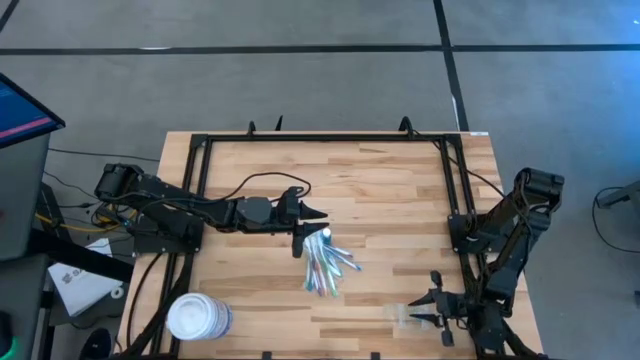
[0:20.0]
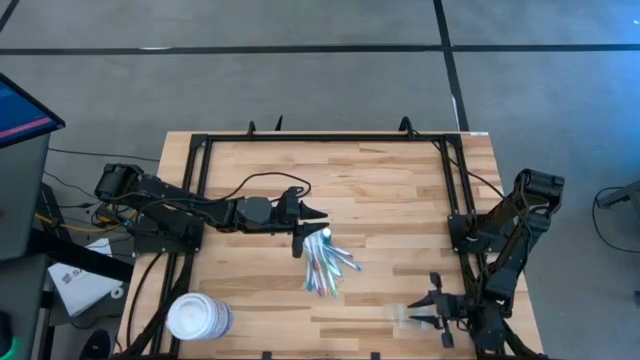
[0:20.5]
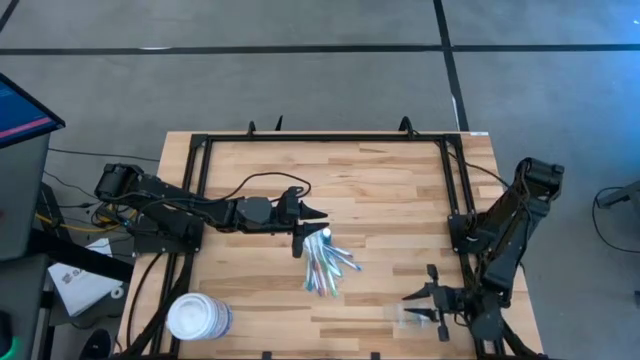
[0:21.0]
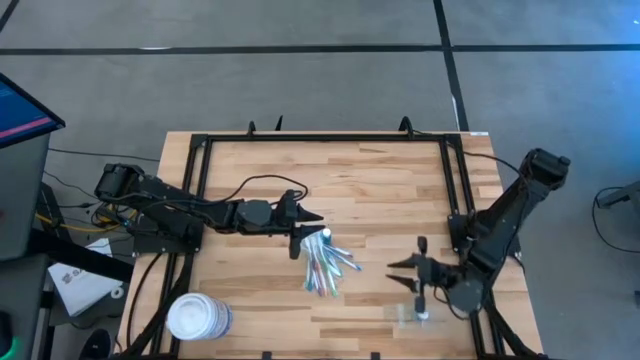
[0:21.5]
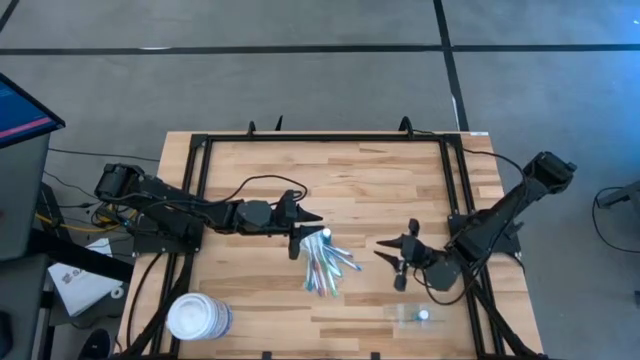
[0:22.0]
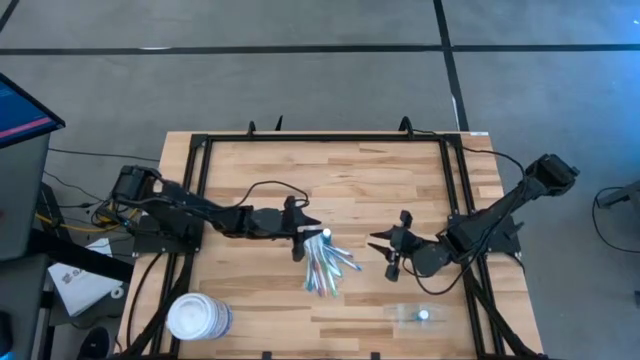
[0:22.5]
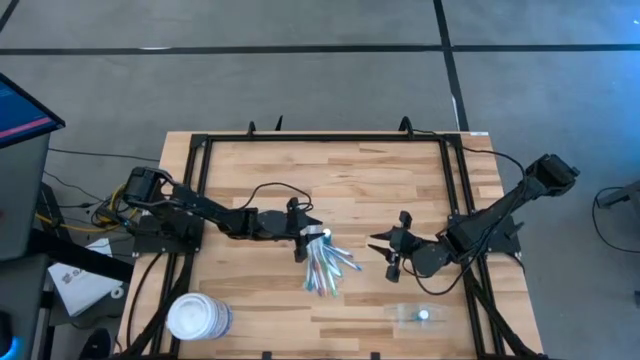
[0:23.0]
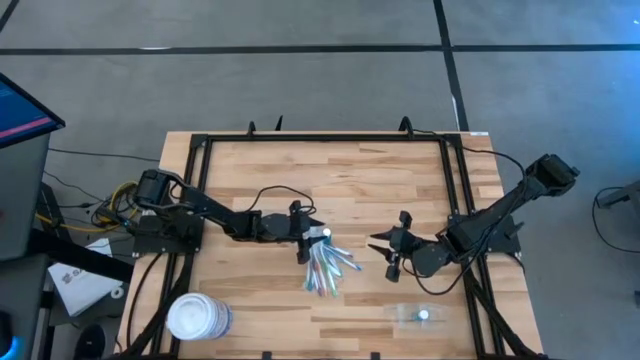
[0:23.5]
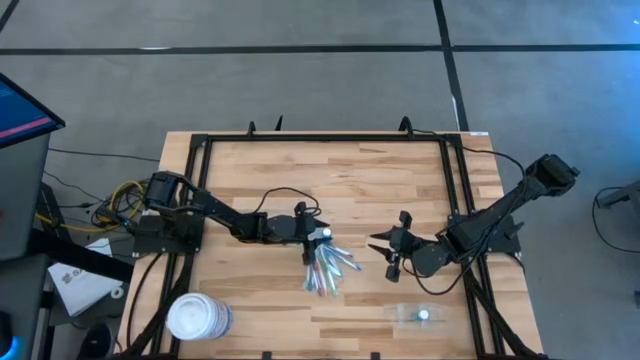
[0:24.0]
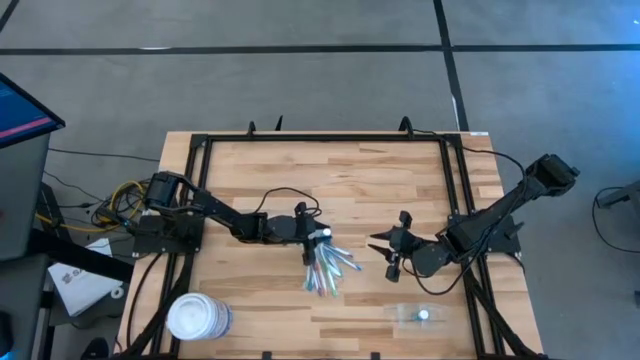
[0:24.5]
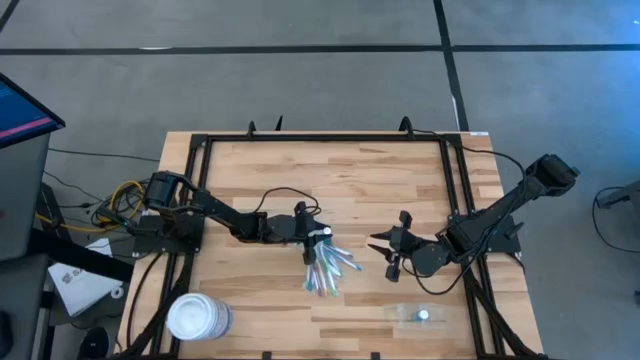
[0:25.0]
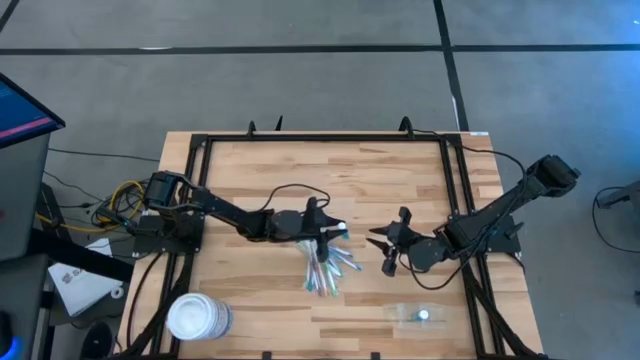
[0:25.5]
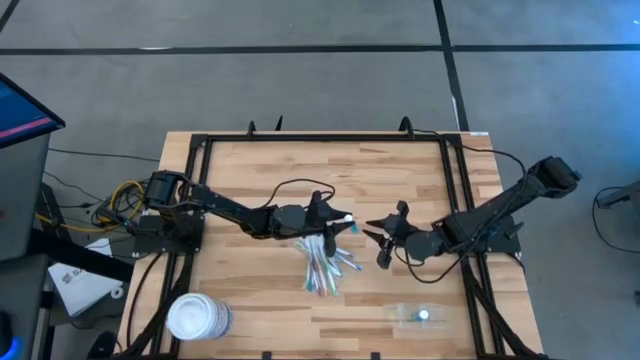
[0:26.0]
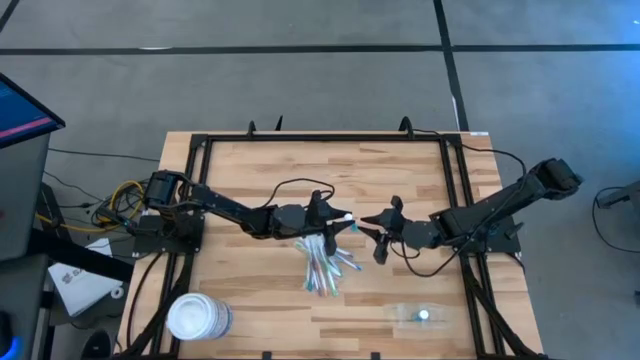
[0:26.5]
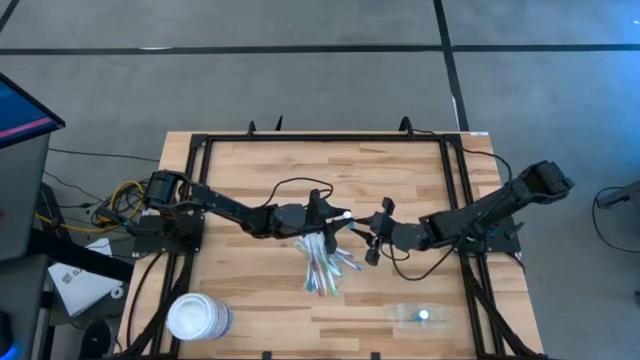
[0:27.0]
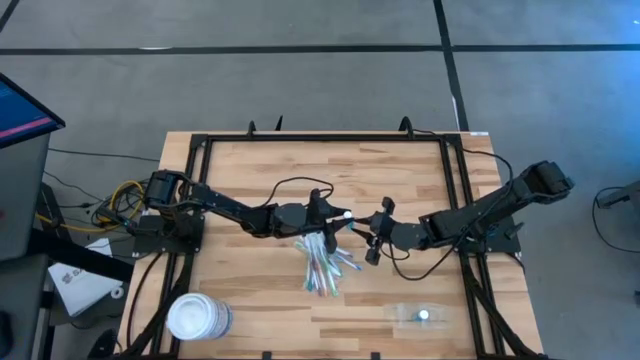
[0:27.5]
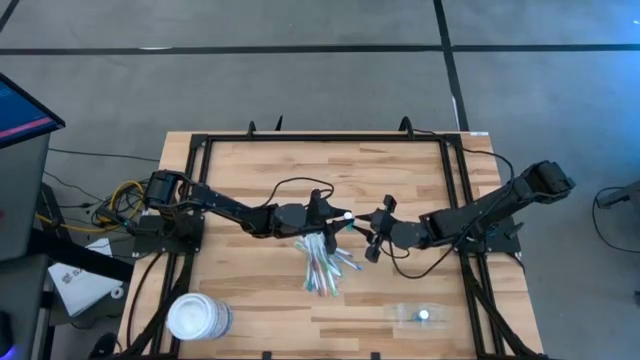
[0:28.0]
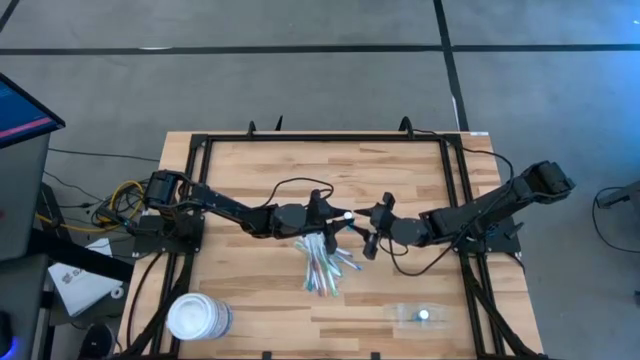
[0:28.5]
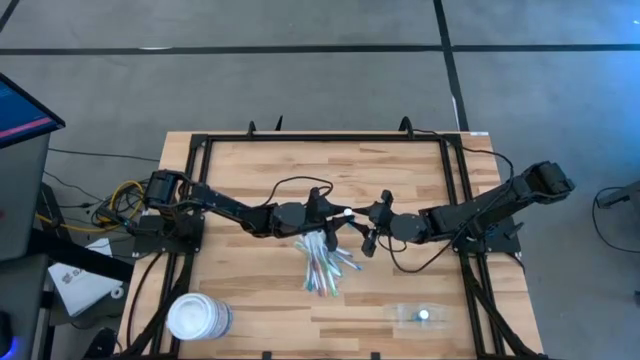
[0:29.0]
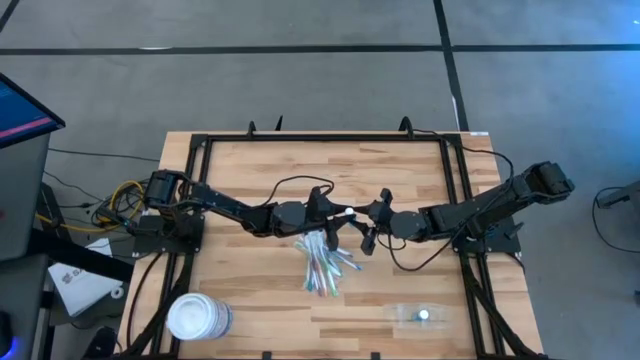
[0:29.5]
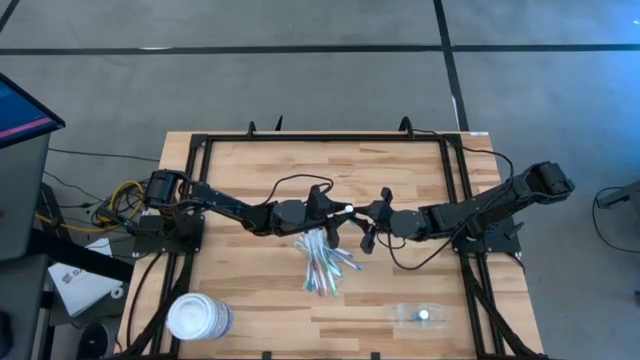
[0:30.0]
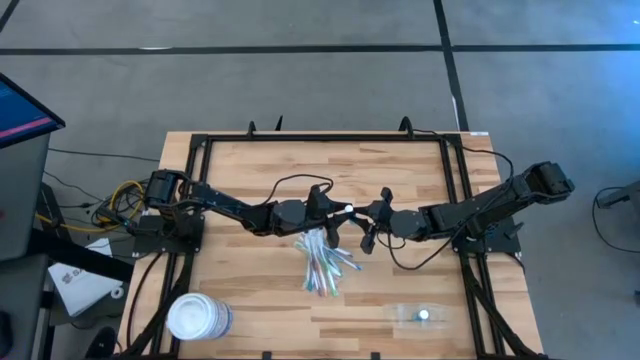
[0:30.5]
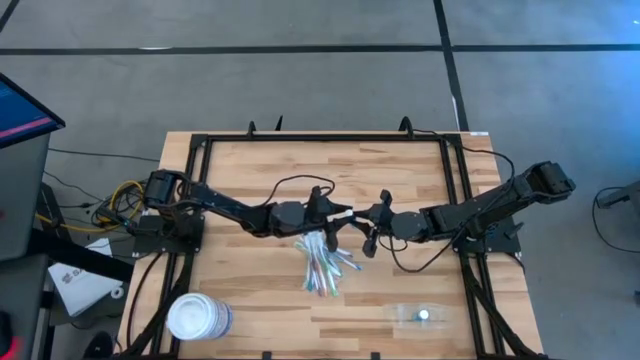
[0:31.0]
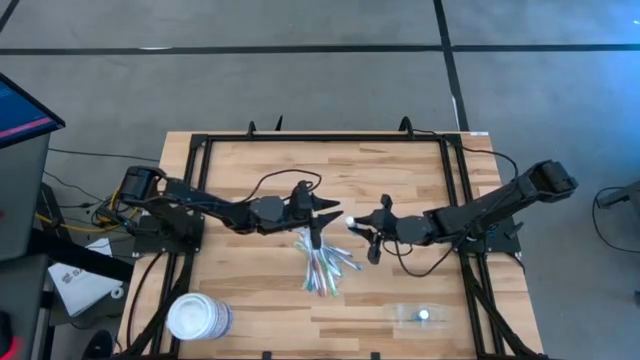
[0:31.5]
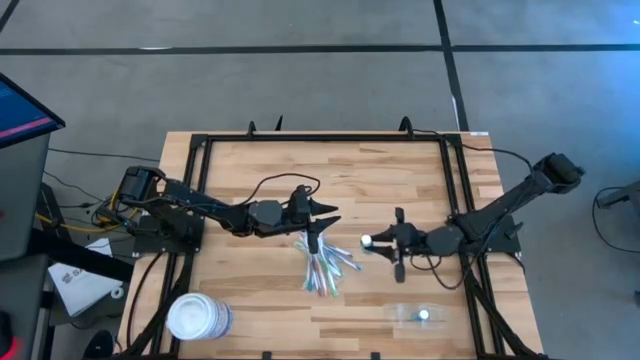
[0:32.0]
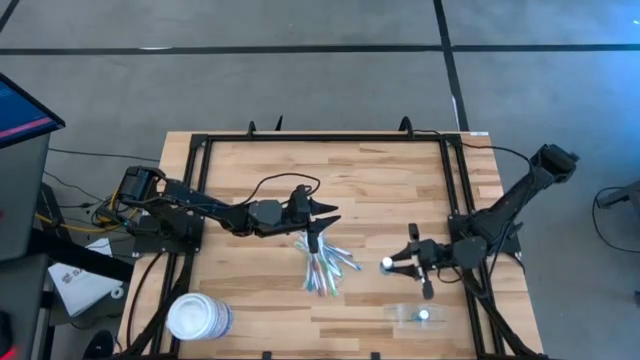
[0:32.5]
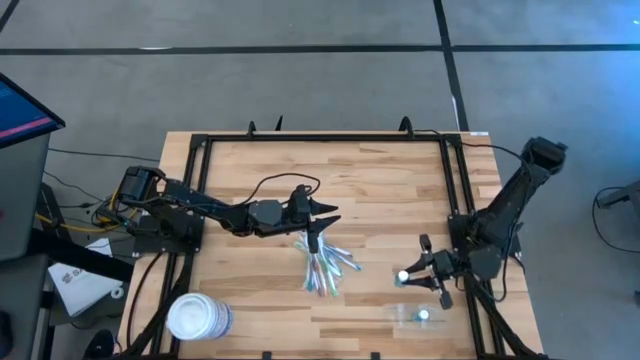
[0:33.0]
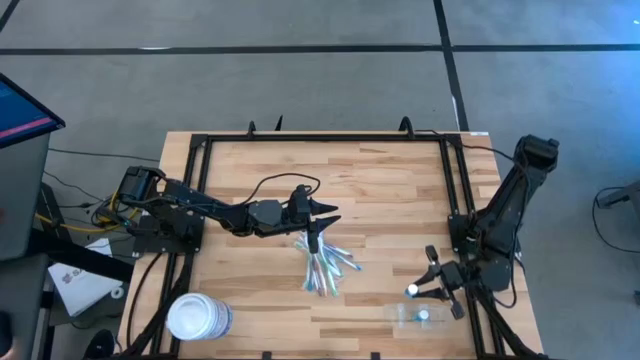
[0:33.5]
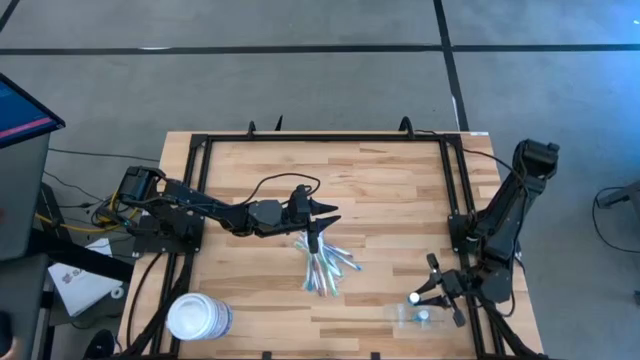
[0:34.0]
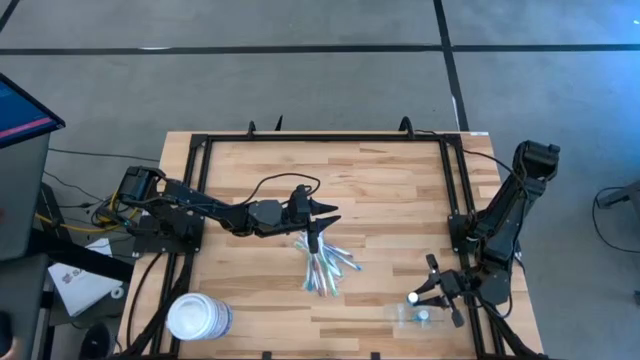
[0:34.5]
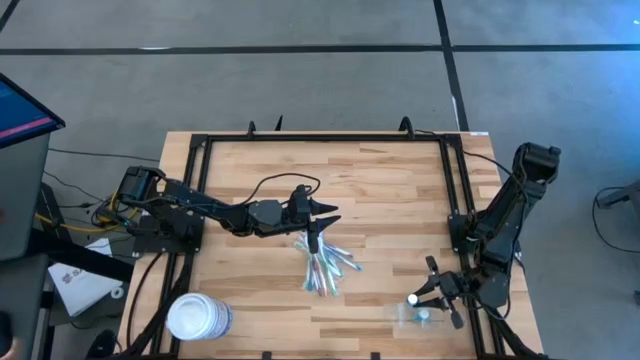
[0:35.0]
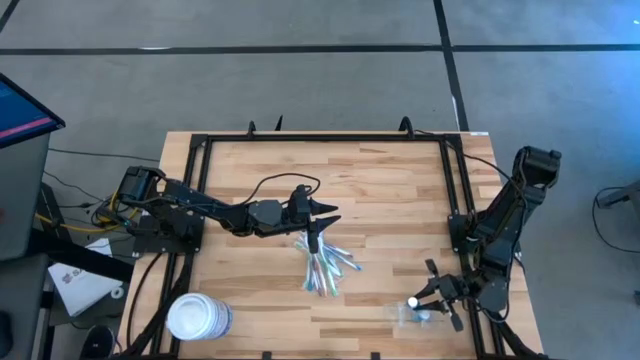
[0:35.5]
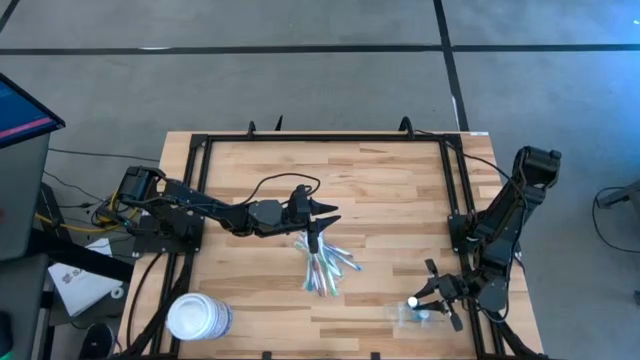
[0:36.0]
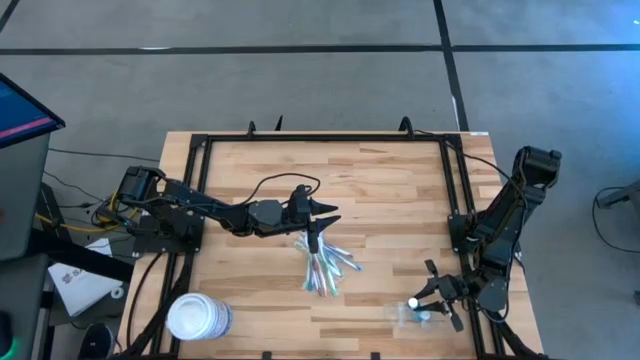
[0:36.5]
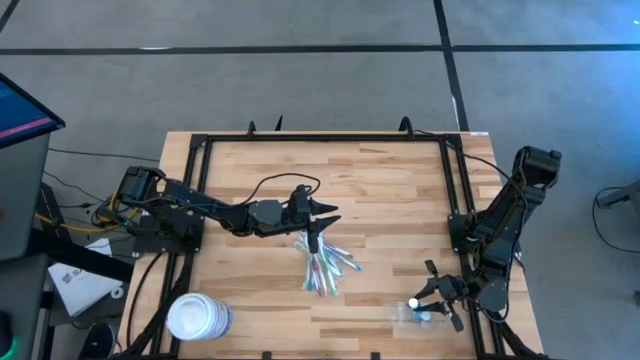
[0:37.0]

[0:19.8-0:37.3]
Task: Pick & Place toothbrushing station
Put the blue mouthwash into the transparent organizer

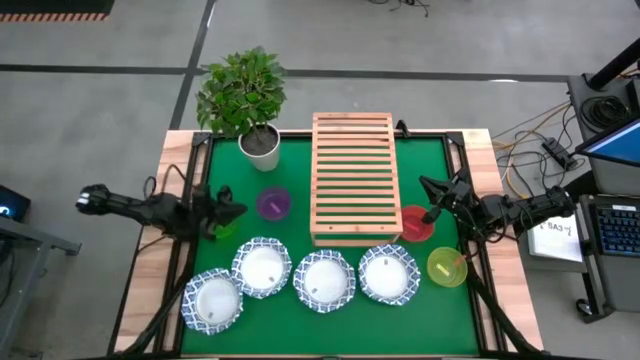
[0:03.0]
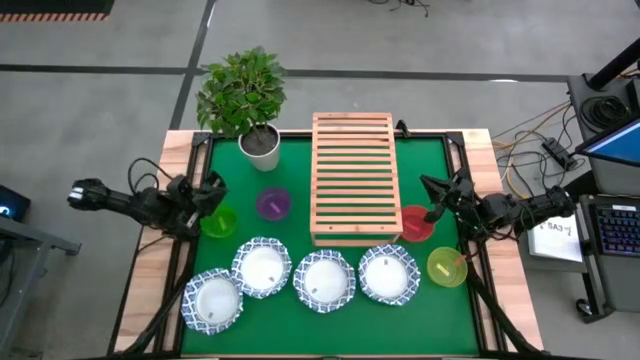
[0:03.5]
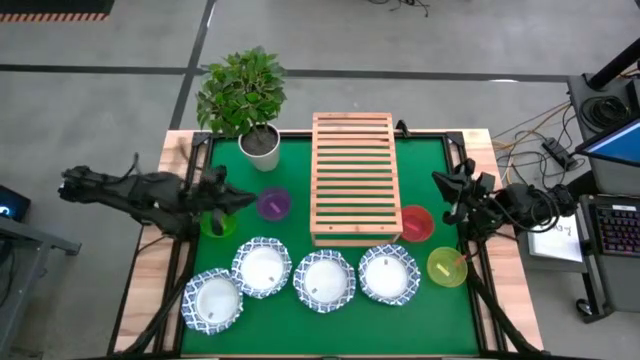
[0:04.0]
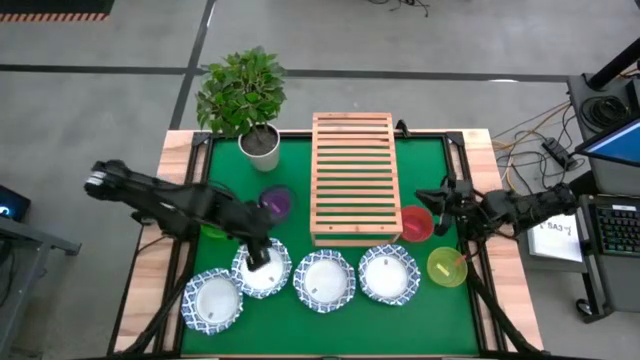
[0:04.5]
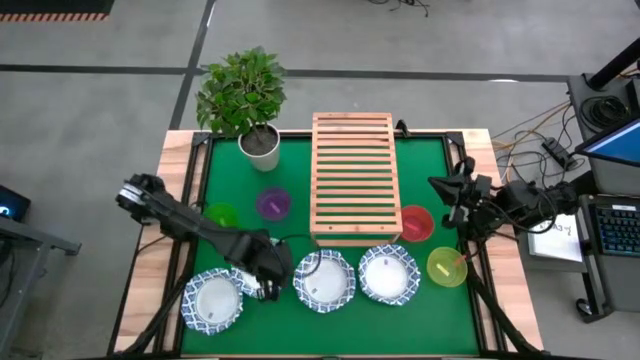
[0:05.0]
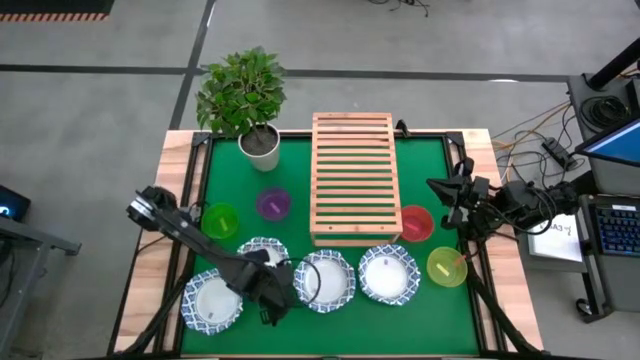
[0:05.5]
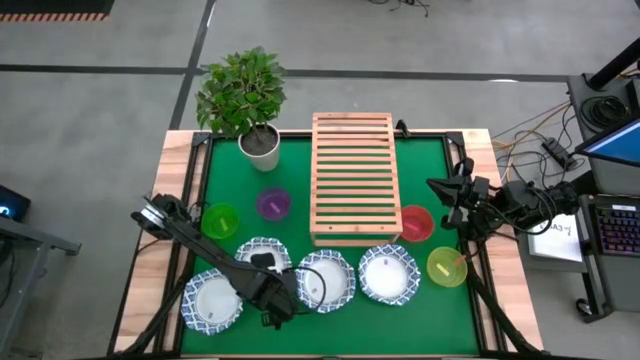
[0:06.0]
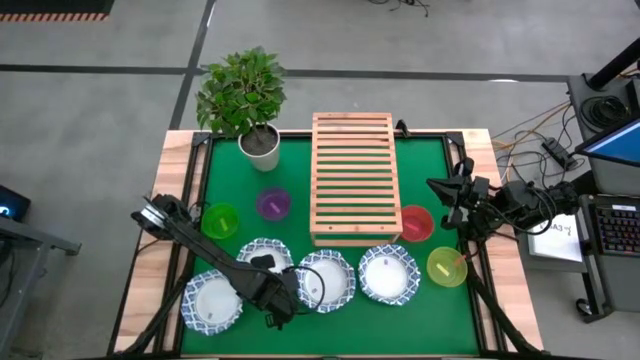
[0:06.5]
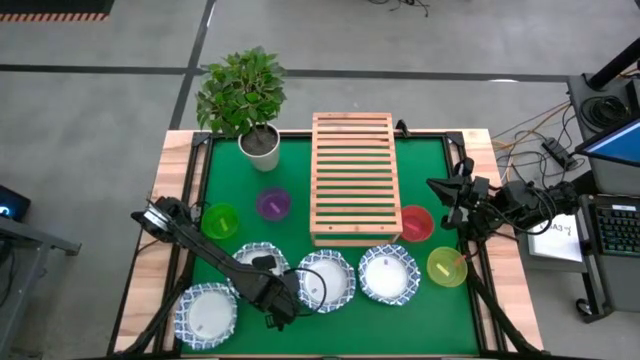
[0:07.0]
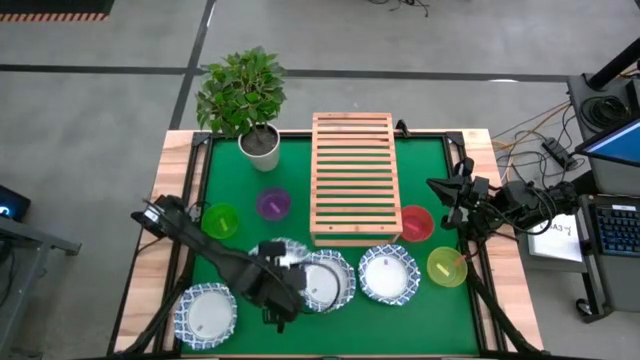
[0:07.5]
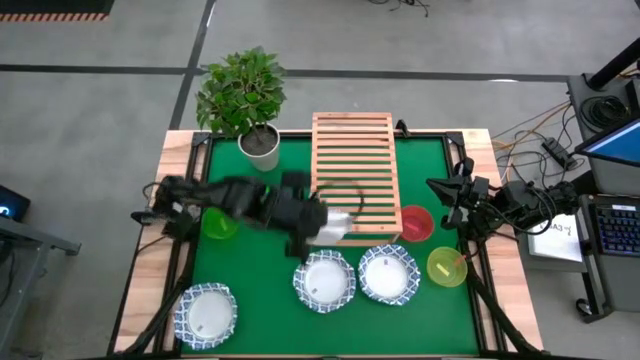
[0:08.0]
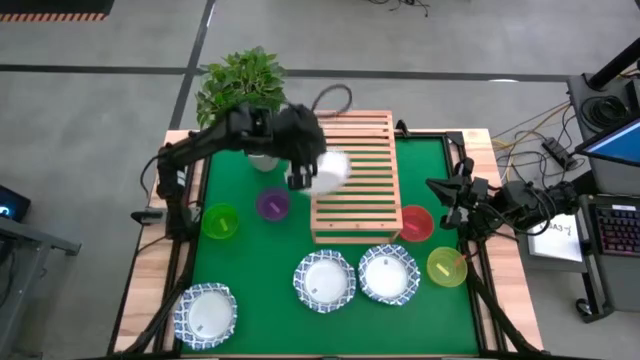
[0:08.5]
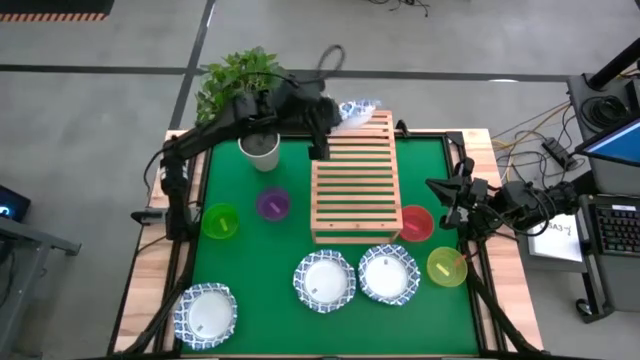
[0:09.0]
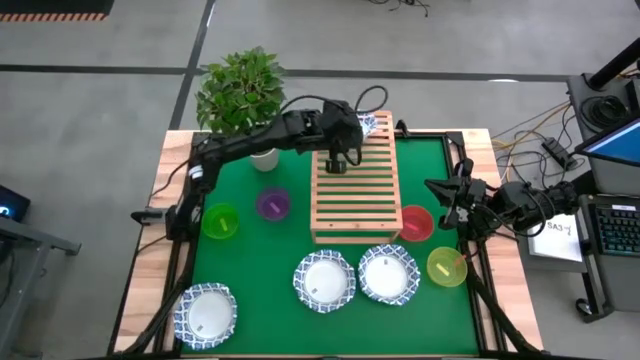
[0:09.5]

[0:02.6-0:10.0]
Task: Place and stack bowls onto a shelf
Put the white patterned bowl on the shelf
